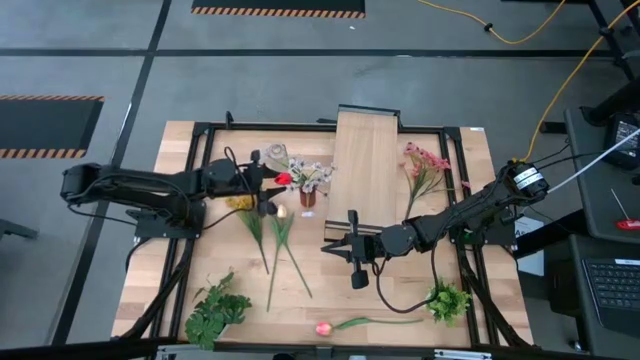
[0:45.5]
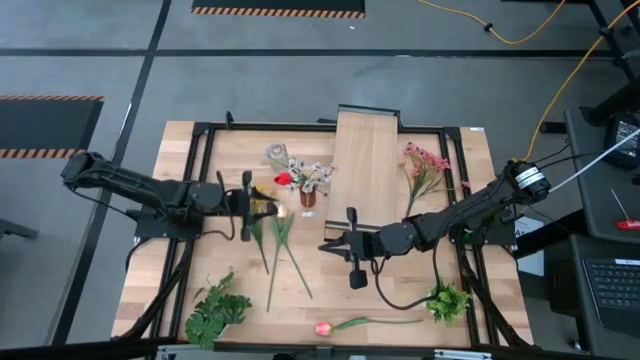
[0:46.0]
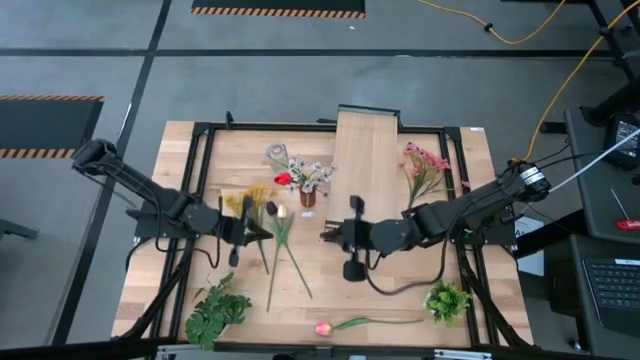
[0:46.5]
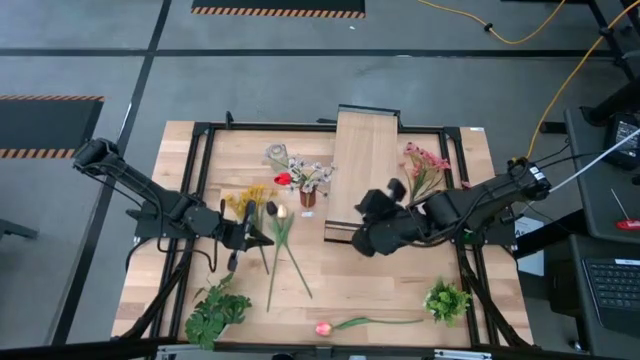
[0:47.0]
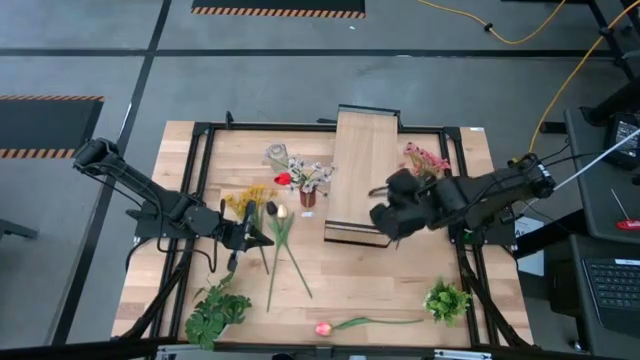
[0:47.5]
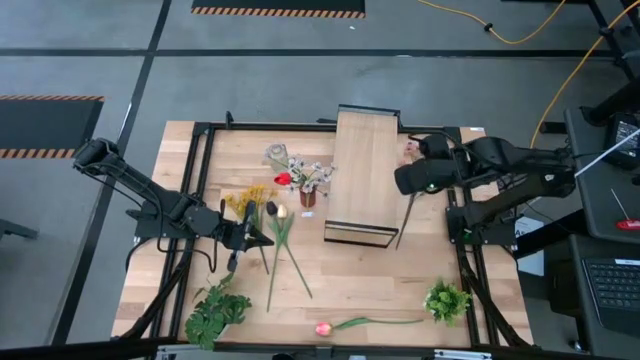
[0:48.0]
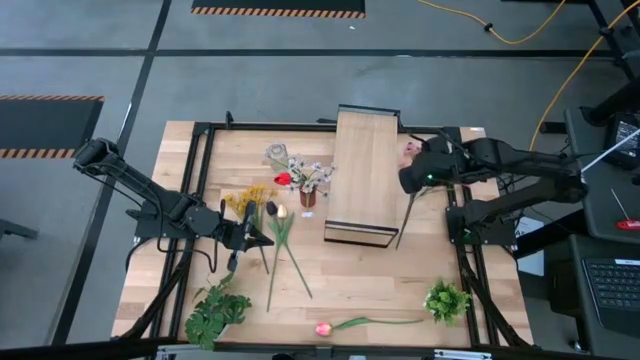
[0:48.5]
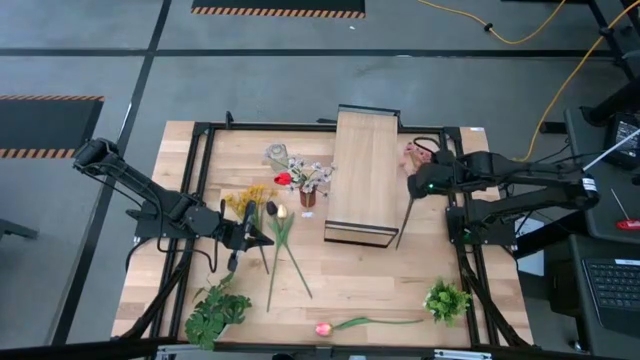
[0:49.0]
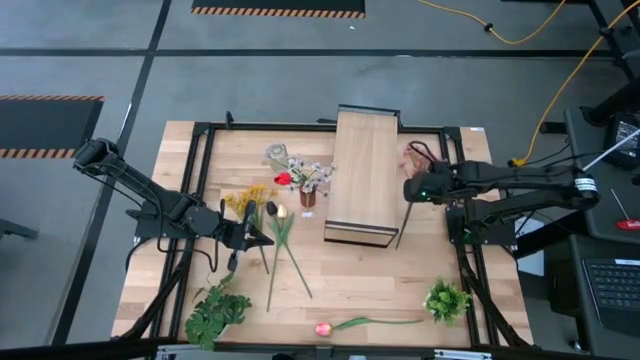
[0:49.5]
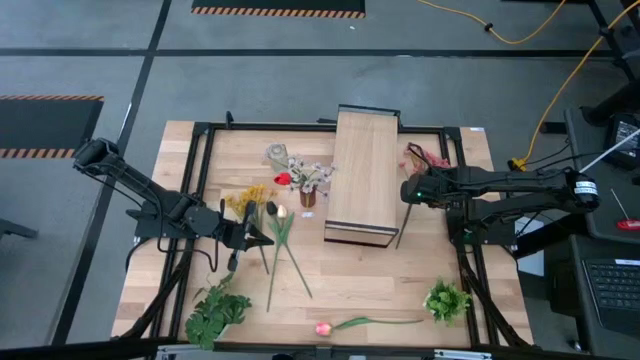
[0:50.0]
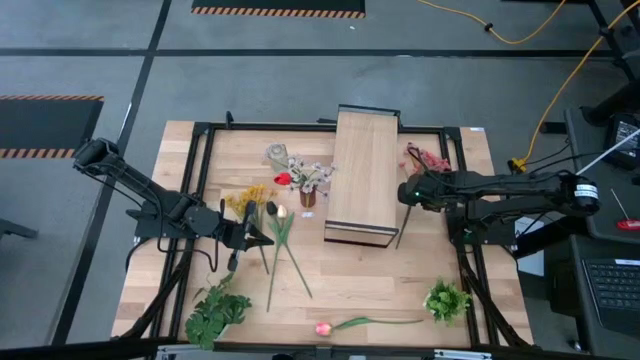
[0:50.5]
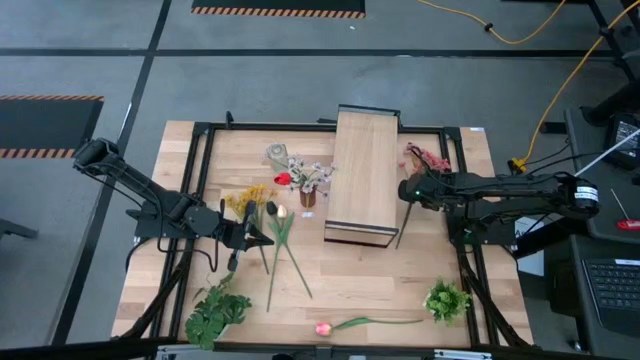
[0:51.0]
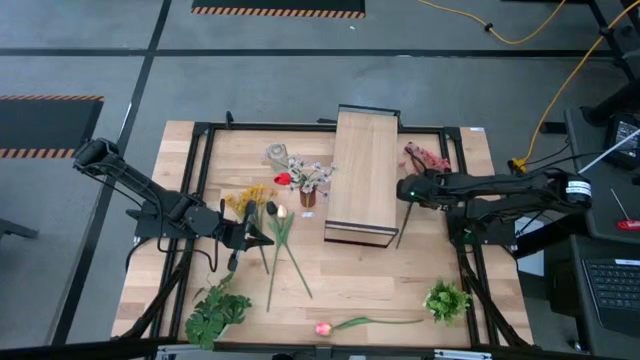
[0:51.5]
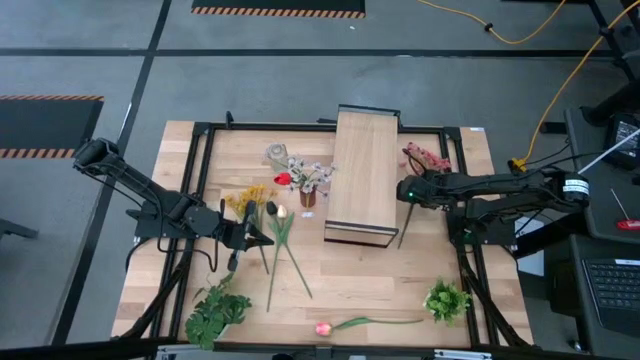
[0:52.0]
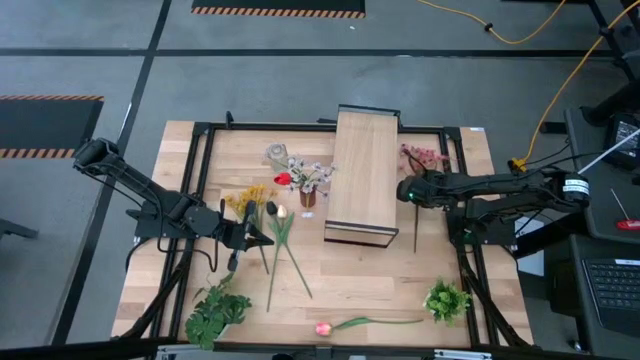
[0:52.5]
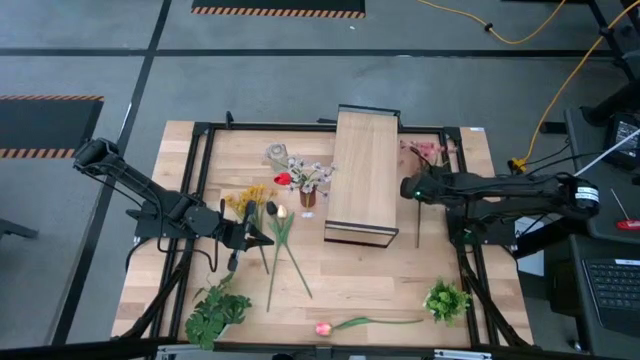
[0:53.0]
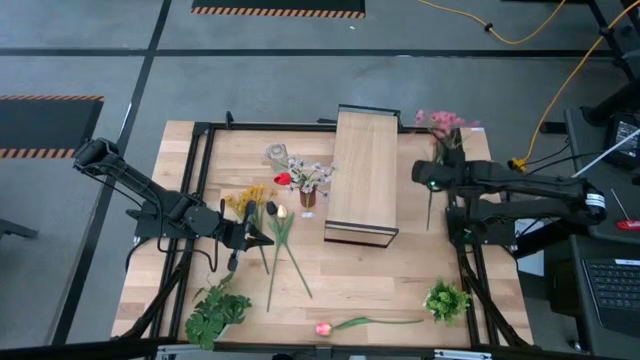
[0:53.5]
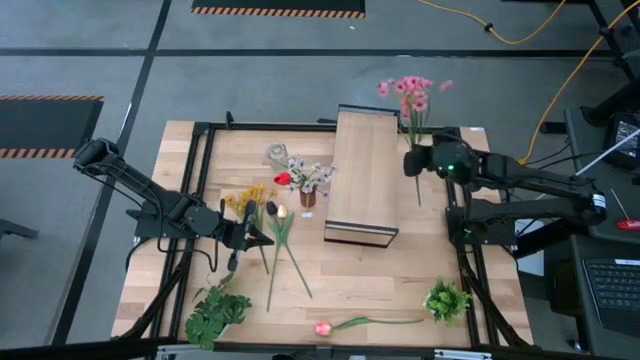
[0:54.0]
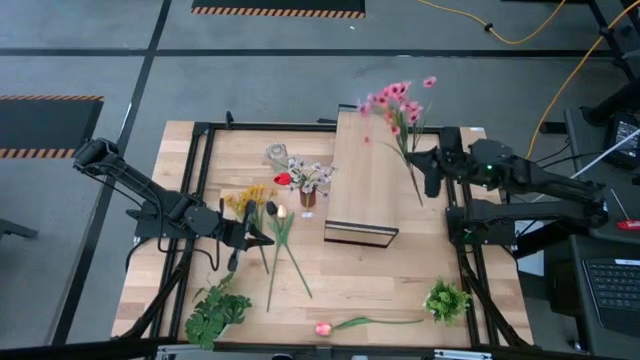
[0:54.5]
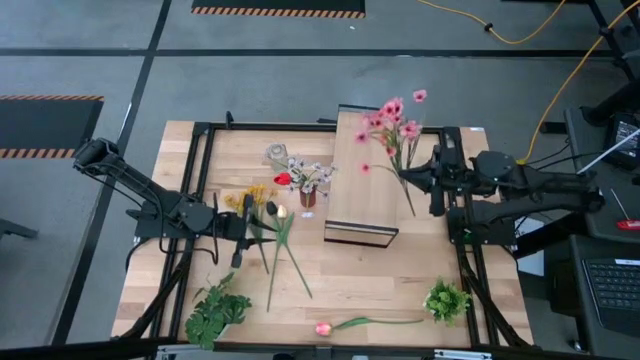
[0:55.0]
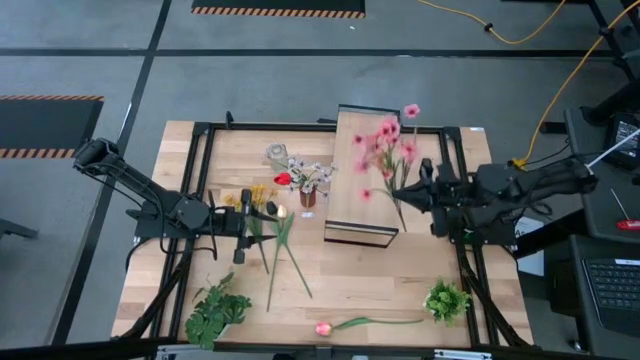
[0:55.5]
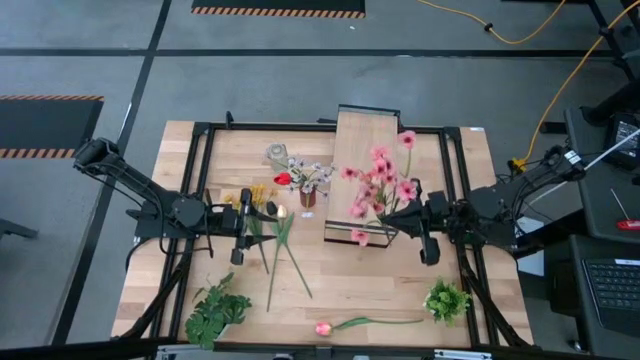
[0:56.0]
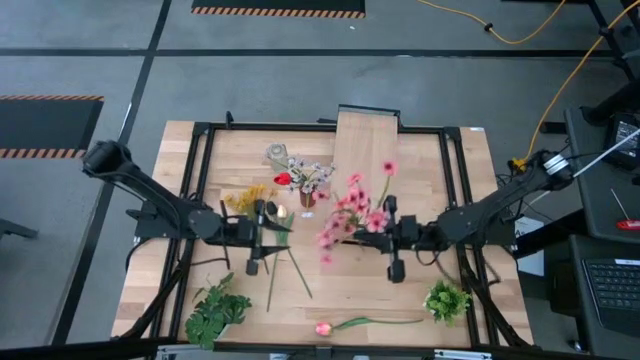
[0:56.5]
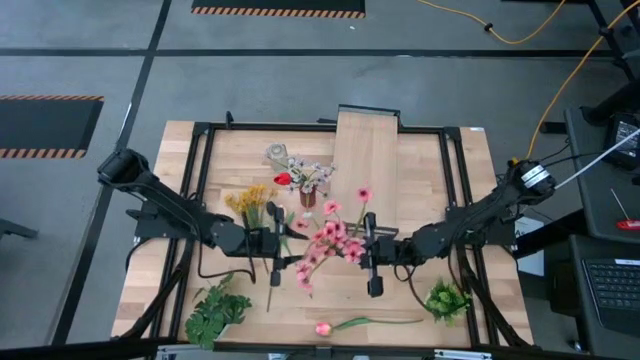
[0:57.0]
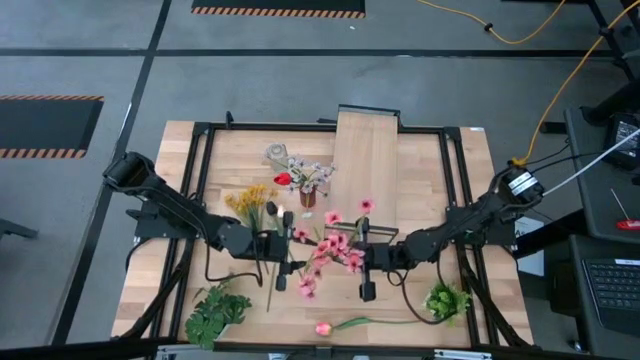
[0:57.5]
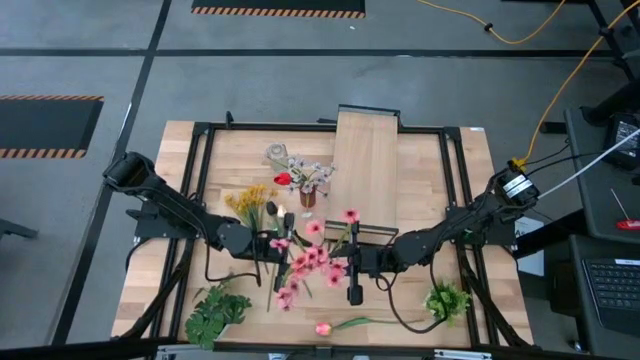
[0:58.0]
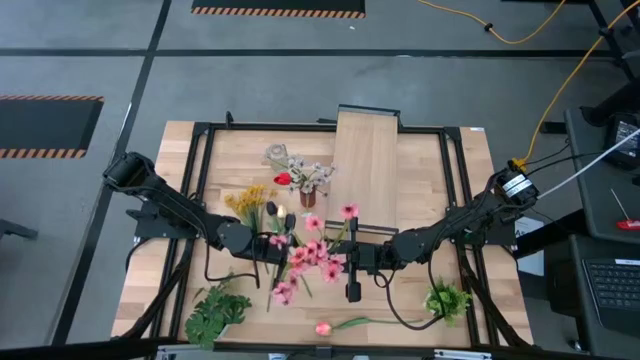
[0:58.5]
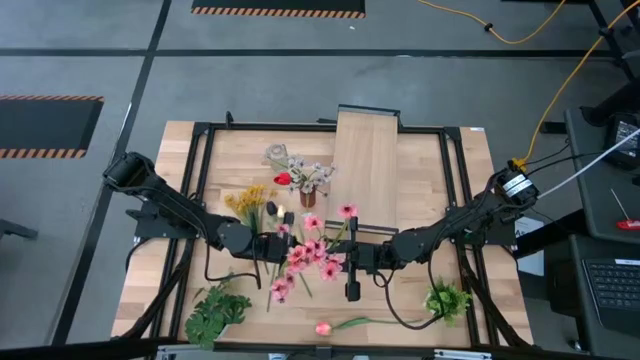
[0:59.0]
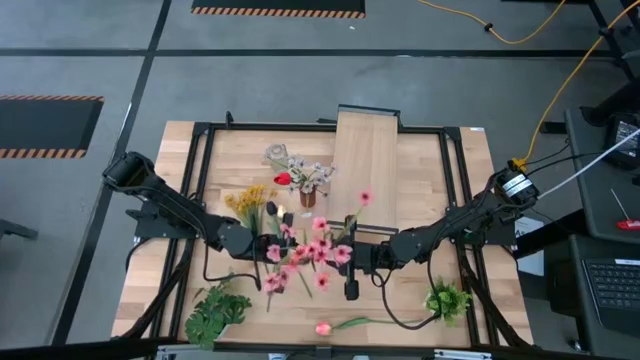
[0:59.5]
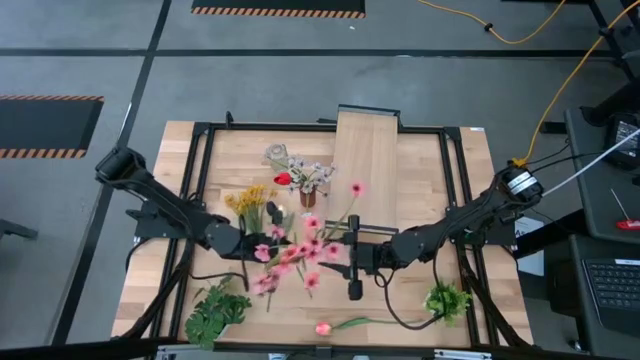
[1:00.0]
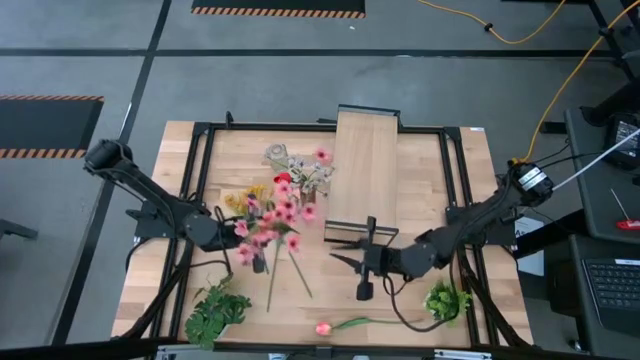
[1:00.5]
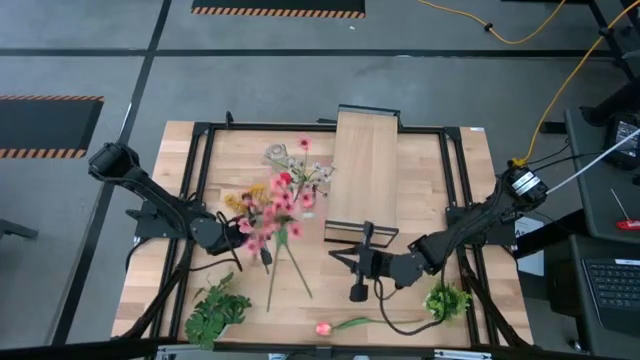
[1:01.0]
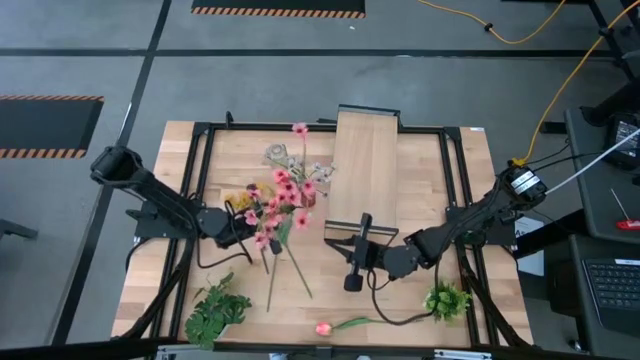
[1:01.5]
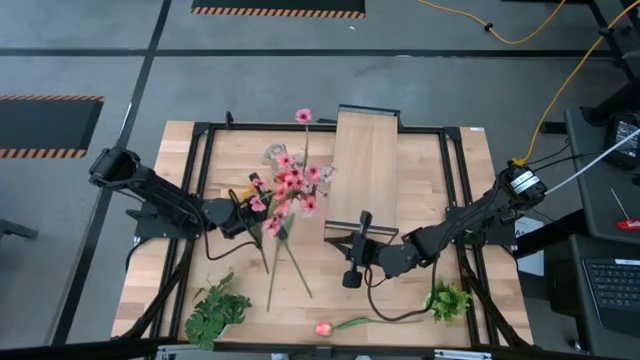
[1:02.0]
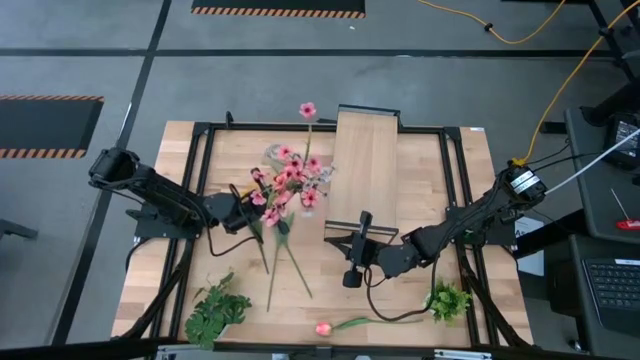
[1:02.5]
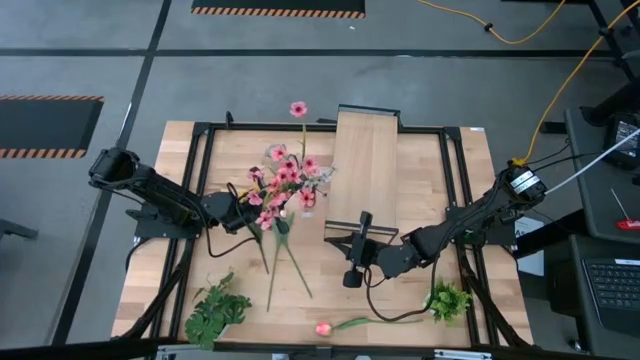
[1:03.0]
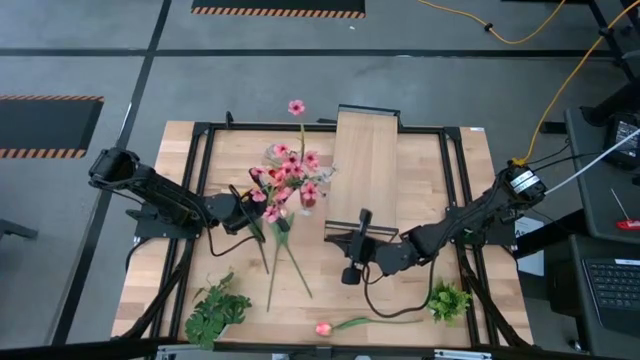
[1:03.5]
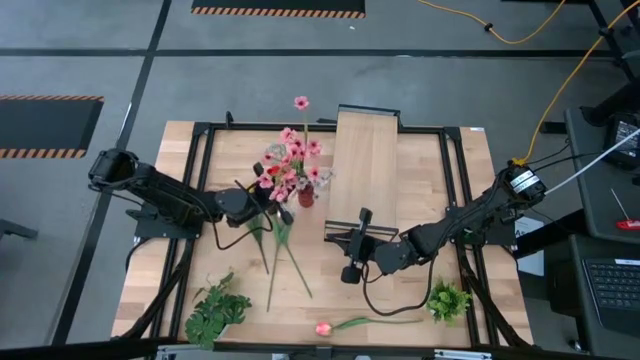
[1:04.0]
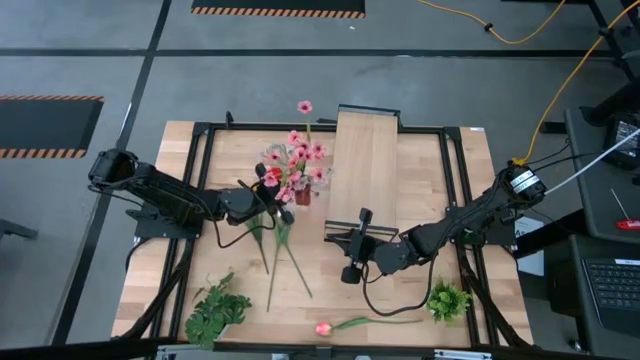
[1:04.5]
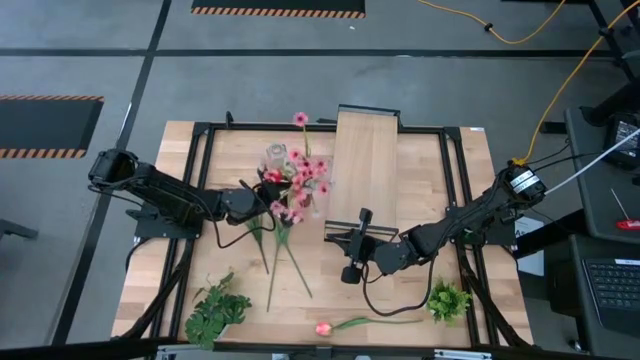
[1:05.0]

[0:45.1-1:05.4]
Task: Pick and place flowers into a vace then onto a shelf
Put the pink flowers into the red vase
